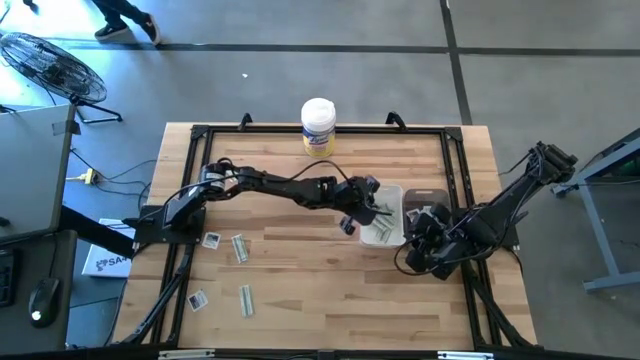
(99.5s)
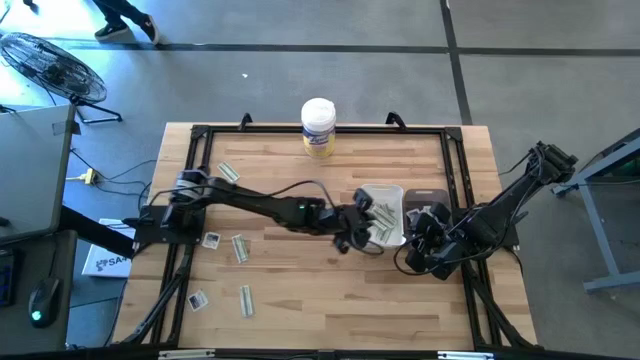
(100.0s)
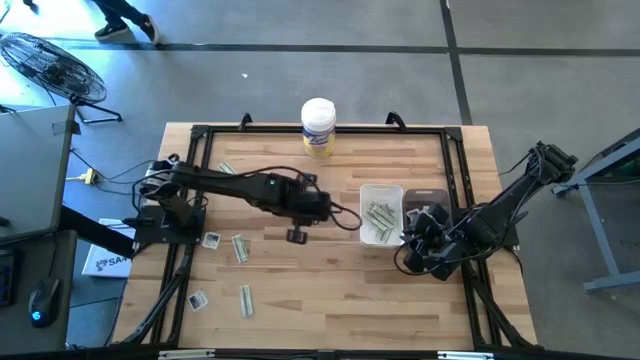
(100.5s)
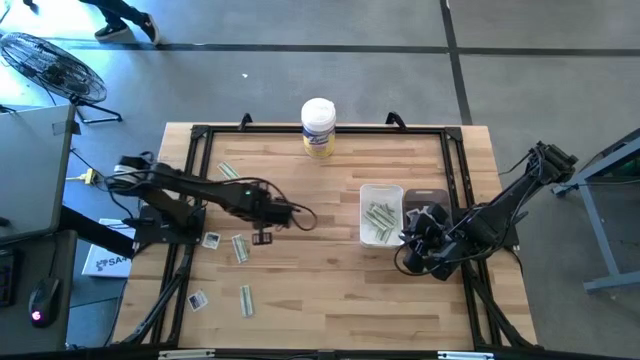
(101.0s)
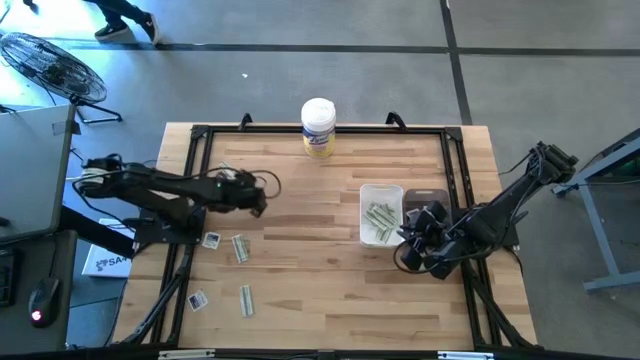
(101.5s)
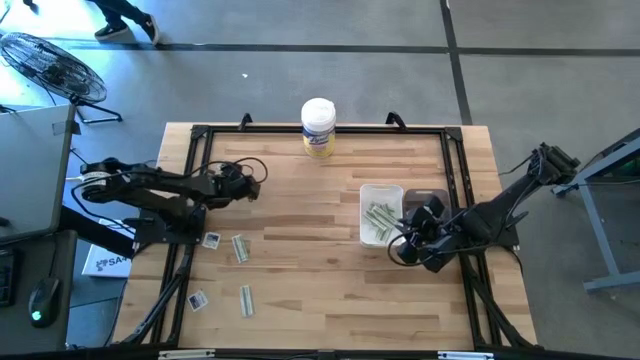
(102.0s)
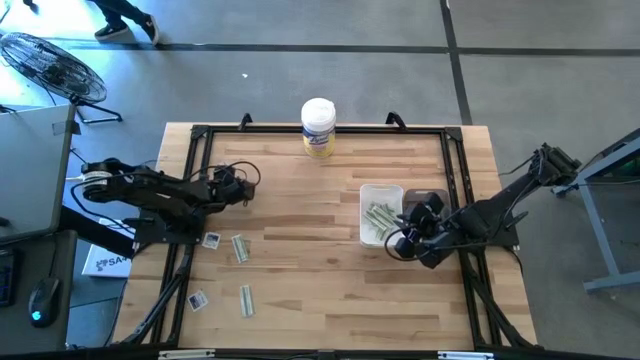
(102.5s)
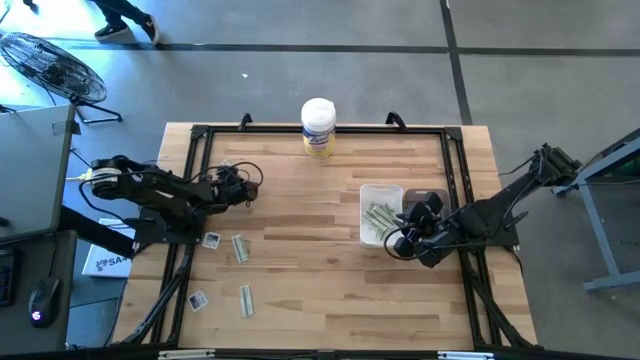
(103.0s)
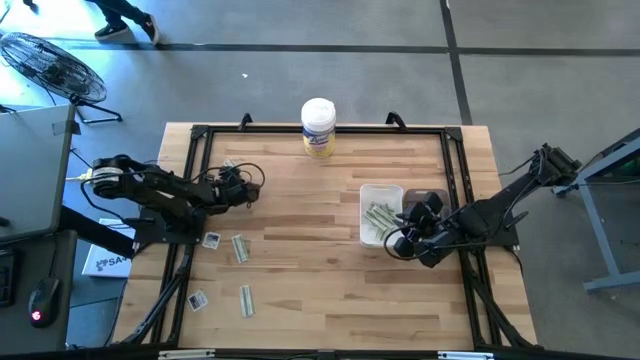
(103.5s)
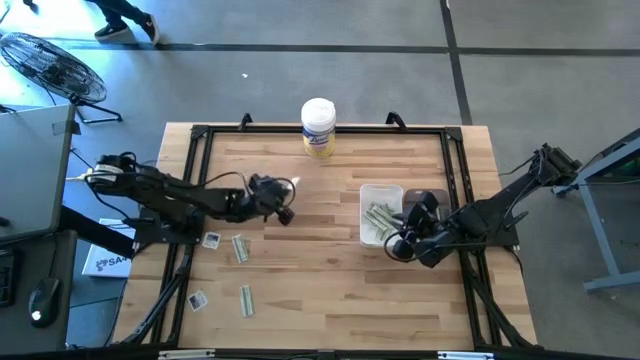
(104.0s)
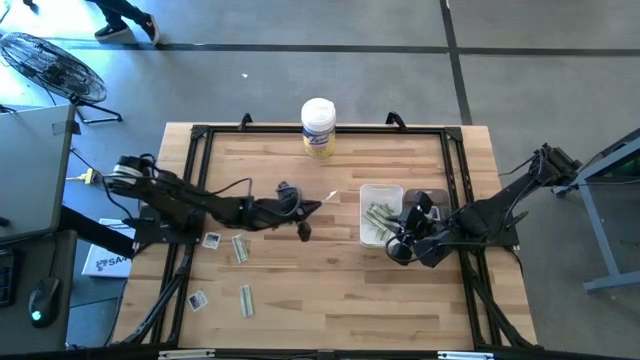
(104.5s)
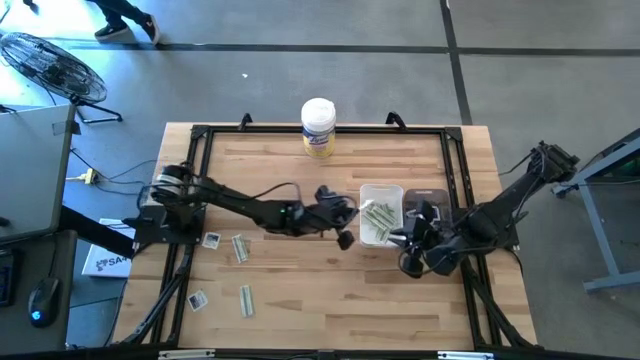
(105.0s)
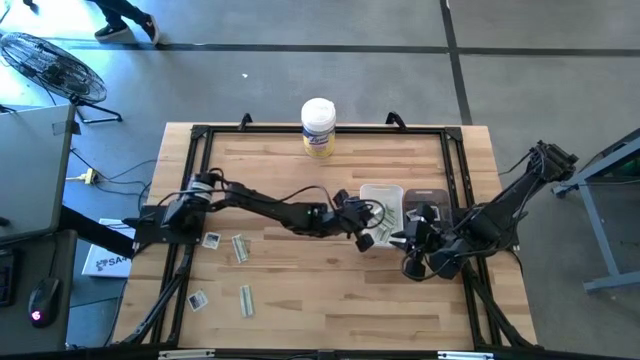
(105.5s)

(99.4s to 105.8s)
Task: Pick & Place First Aid Supplies
Put the green bandage pack into the white bin

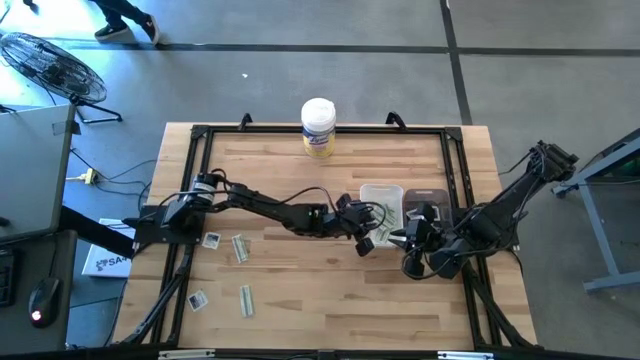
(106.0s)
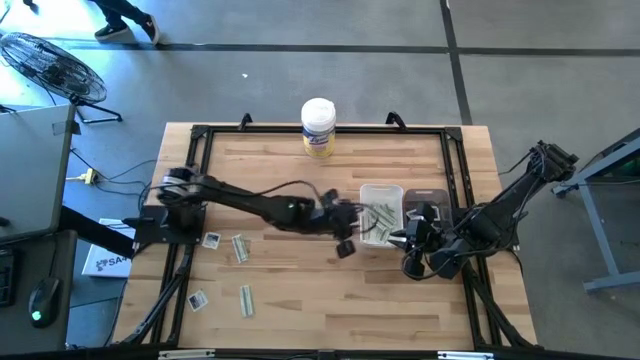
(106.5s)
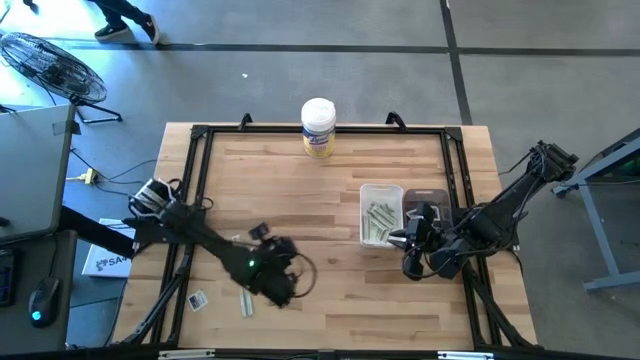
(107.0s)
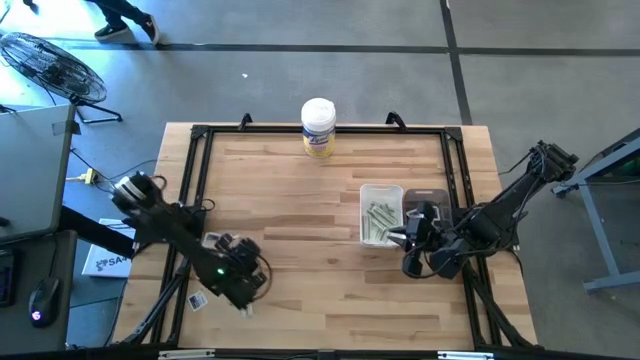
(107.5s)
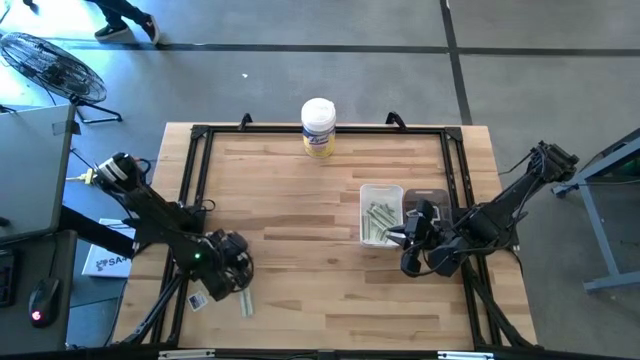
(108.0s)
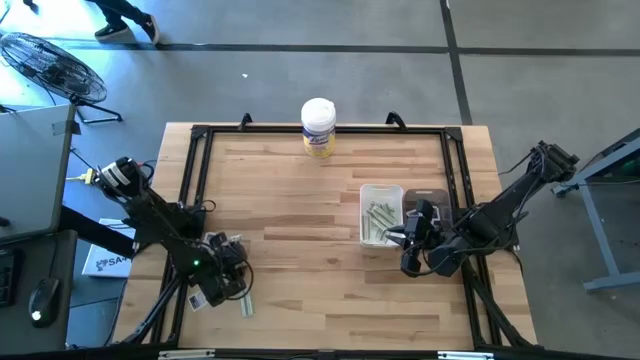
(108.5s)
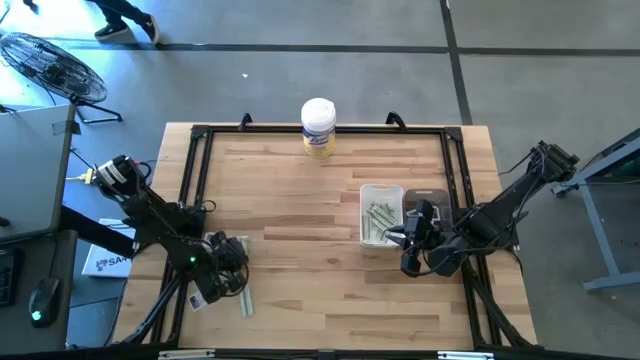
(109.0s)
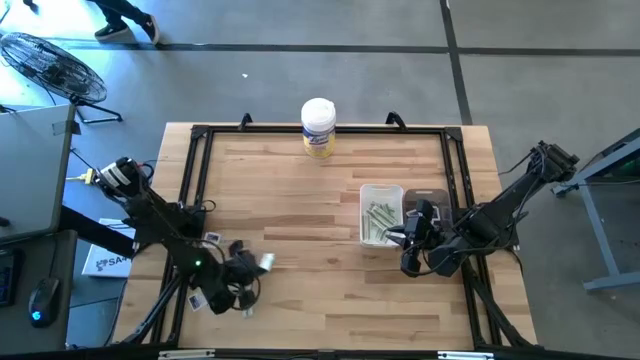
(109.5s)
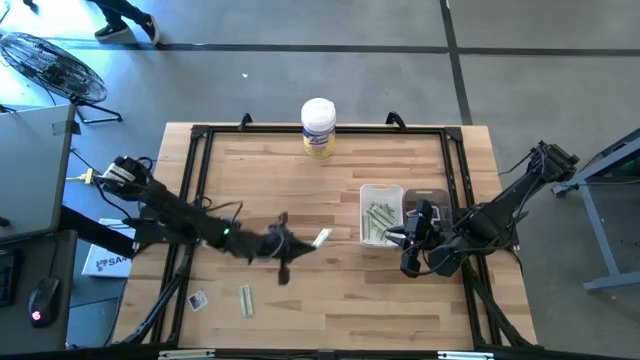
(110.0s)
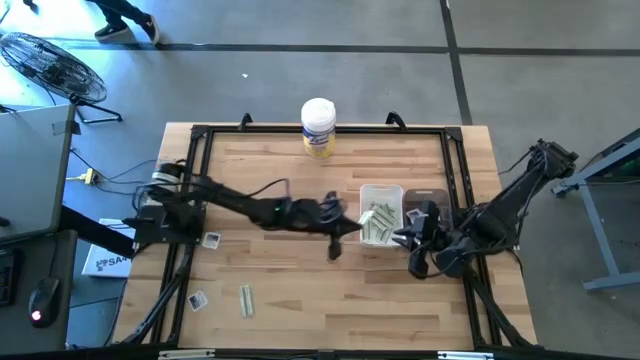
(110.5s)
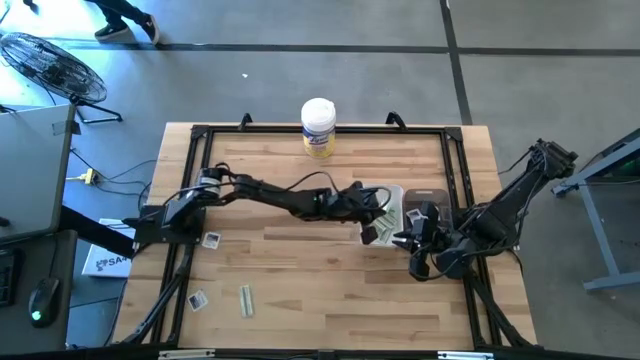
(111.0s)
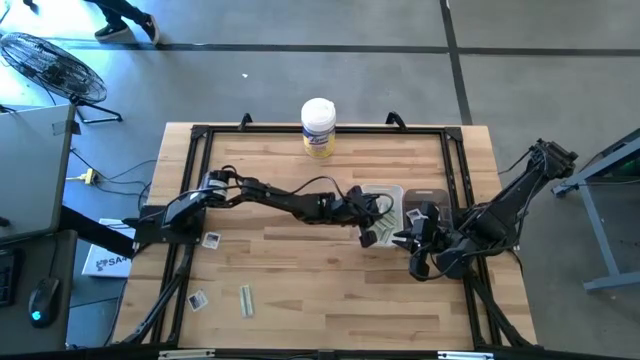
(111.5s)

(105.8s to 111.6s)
Put the green bandage pack into the white bin

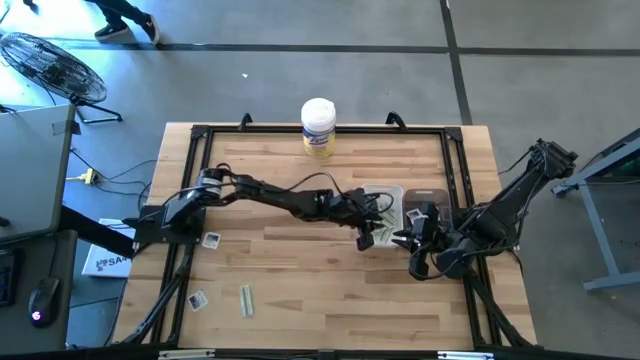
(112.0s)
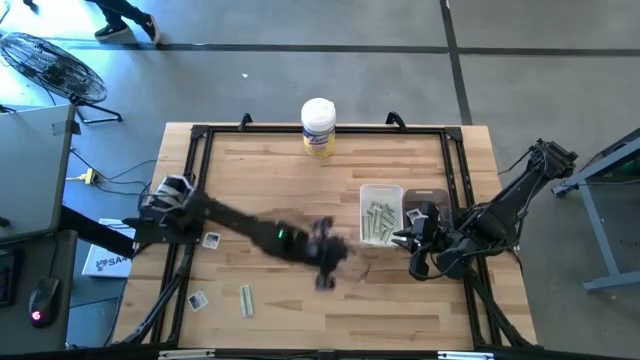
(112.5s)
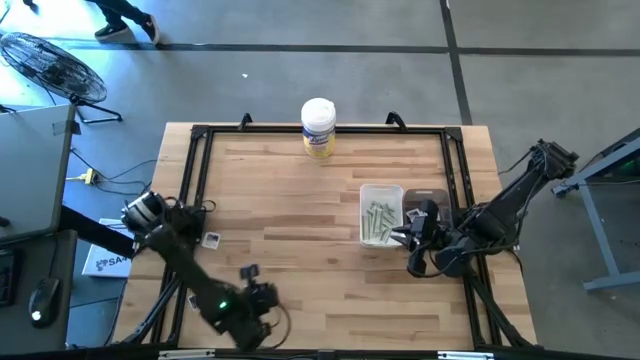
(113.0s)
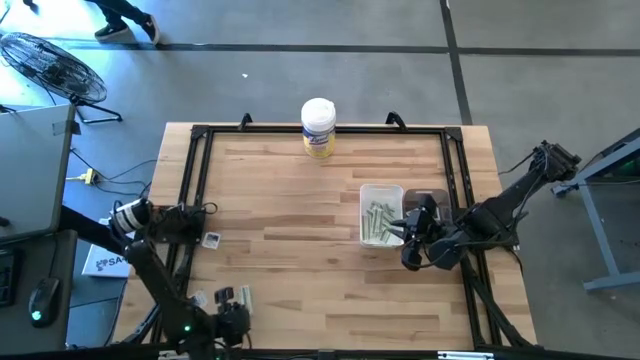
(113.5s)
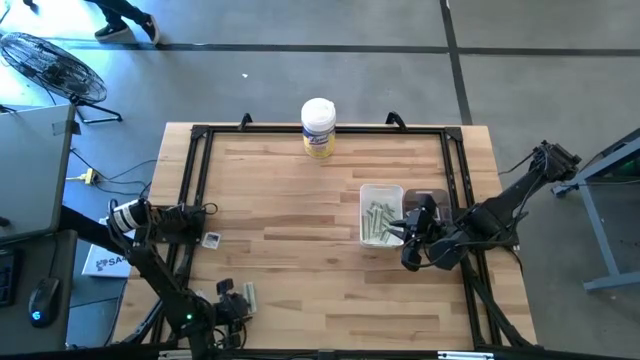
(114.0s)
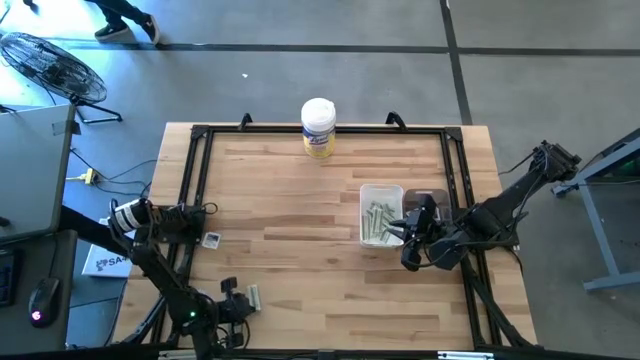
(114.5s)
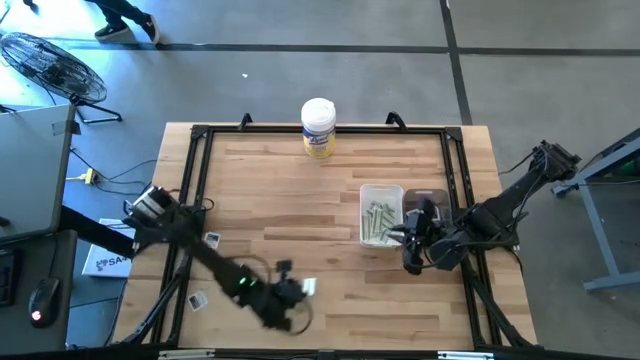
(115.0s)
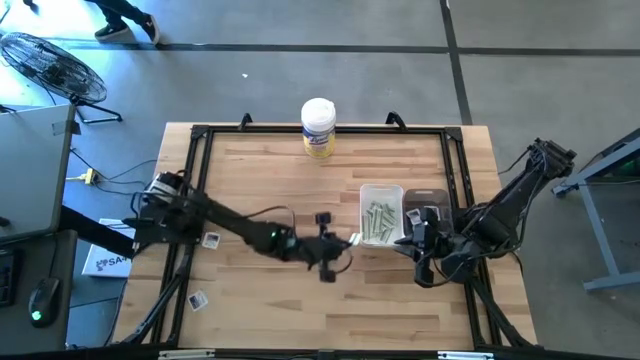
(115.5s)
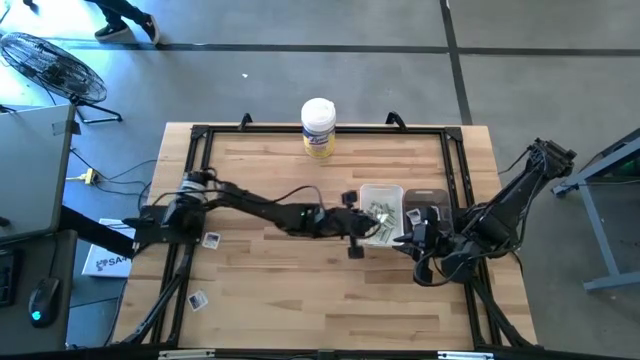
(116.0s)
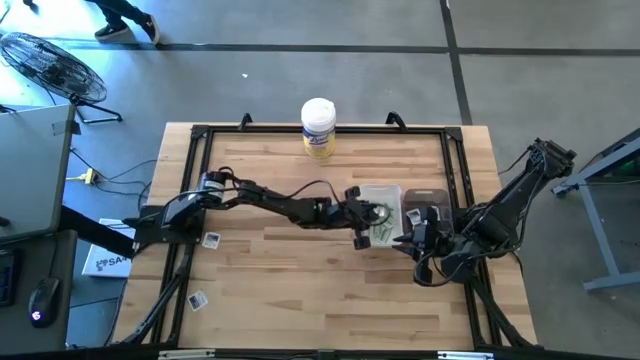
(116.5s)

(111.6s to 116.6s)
Put the green bandage pack into the white bin

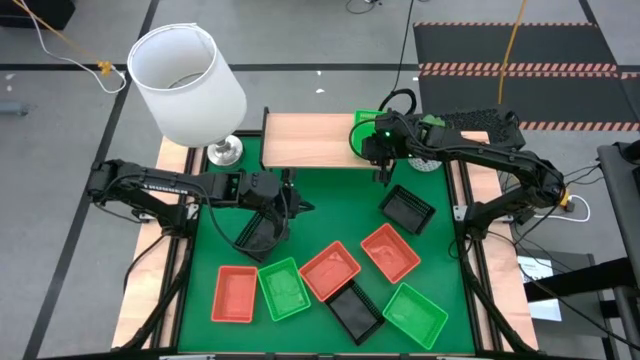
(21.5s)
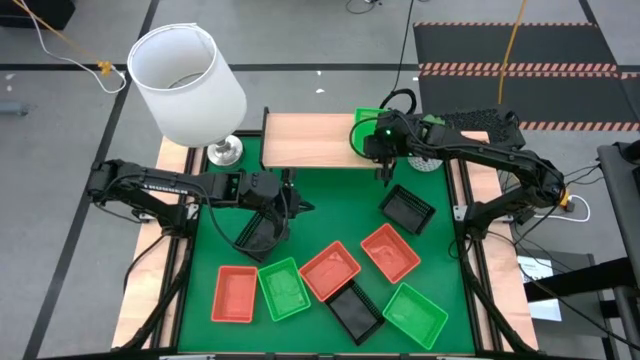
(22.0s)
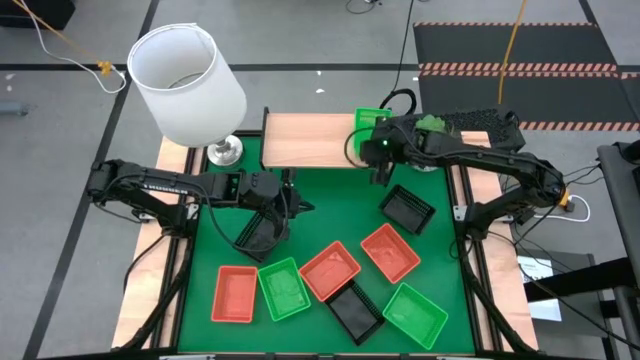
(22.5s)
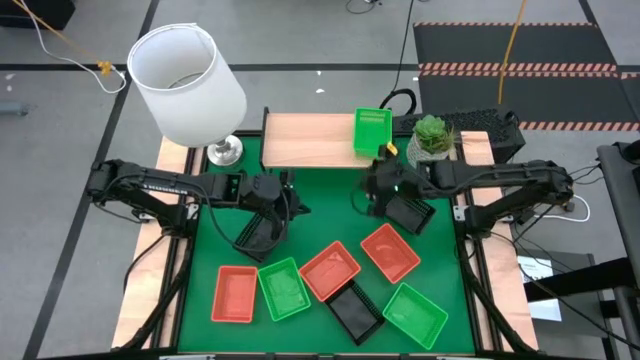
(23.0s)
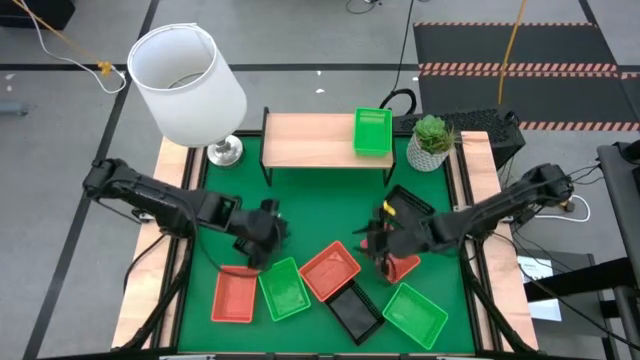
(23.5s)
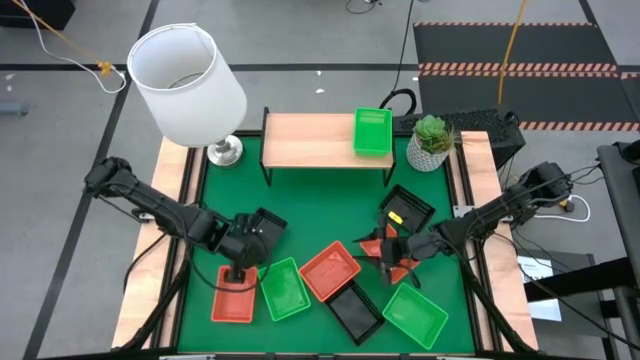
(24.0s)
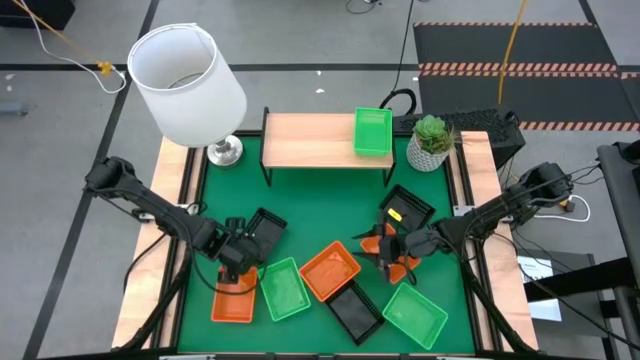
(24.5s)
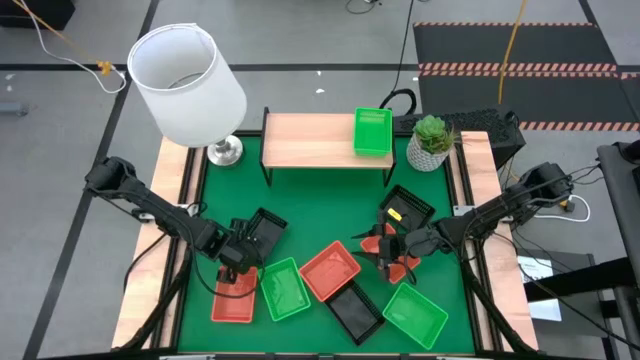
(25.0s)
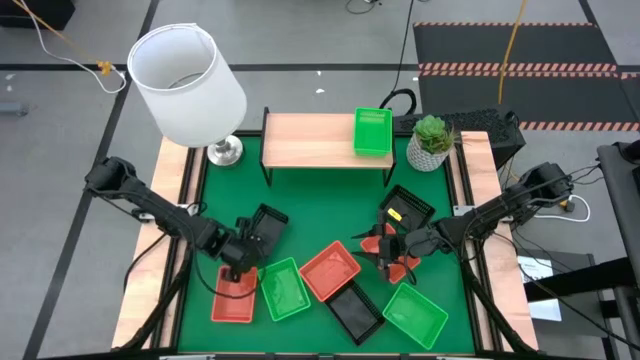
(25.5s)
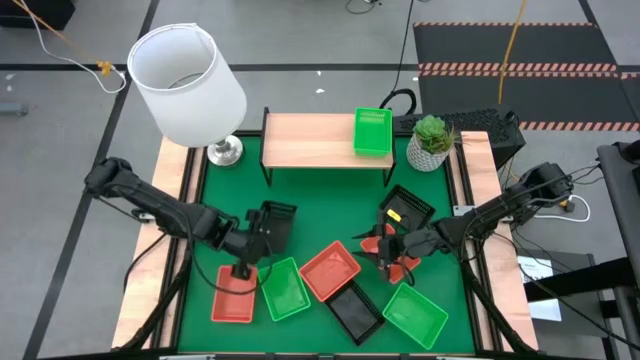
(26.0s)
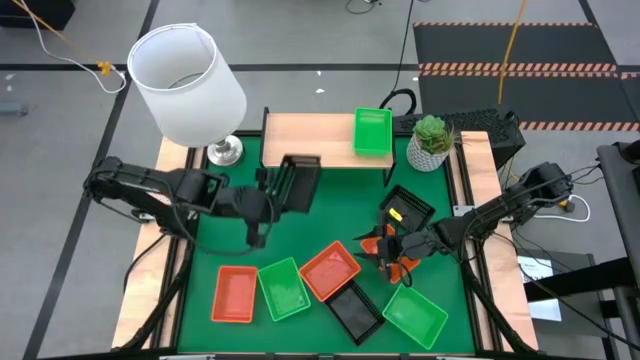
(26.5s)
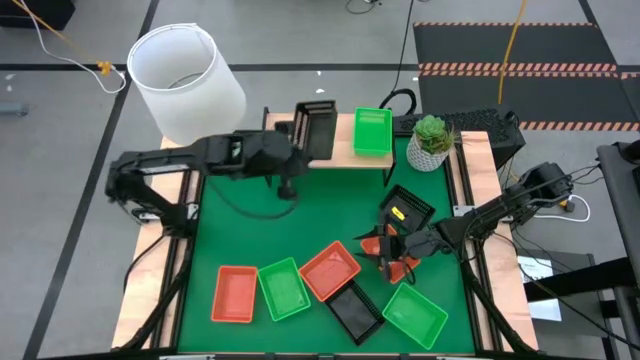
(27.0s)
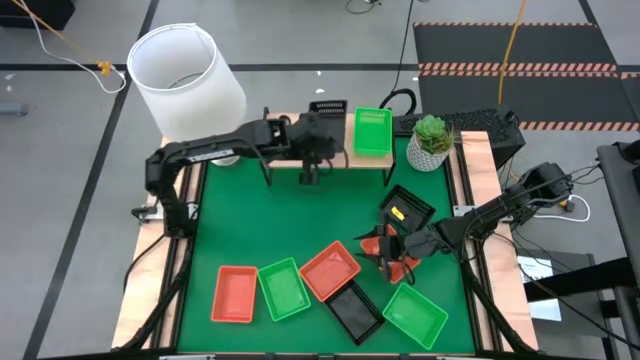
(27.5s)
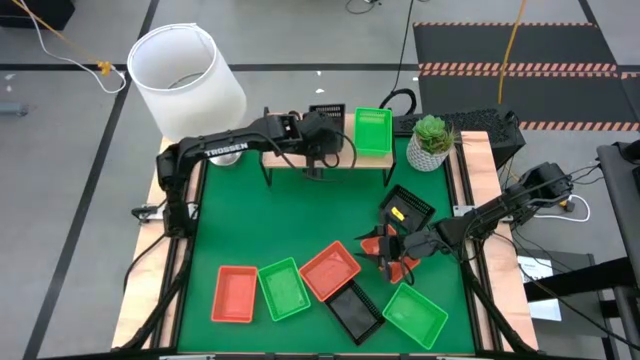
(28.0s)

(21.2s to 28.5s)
Task: Stack baskets on shelf by color
Put the top left black basket on the shelf
